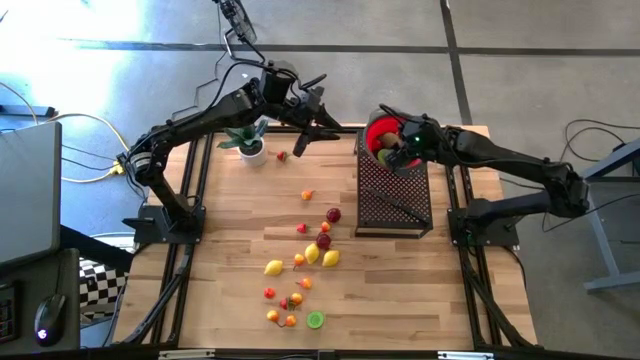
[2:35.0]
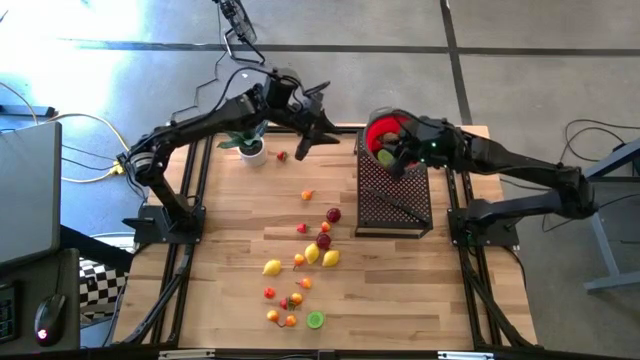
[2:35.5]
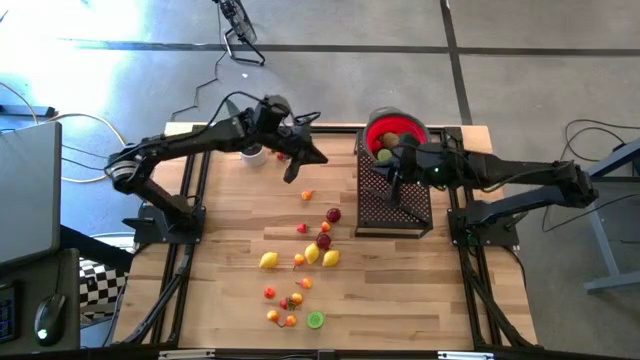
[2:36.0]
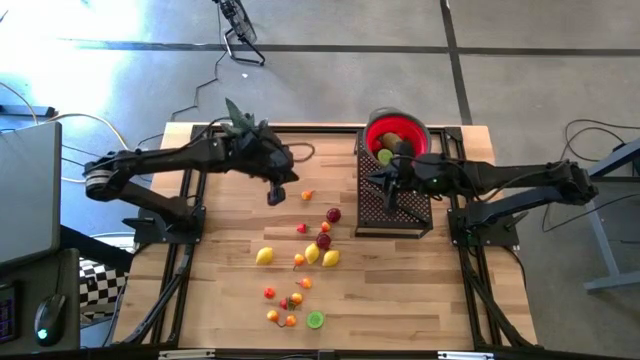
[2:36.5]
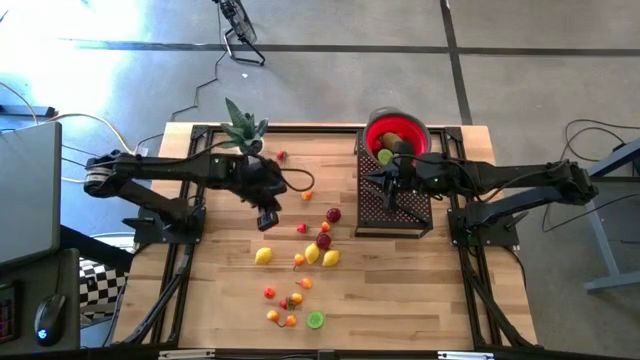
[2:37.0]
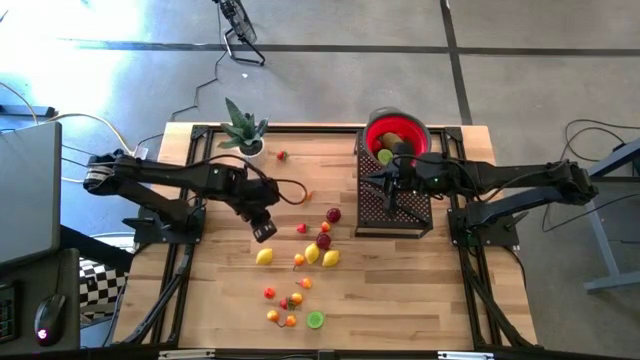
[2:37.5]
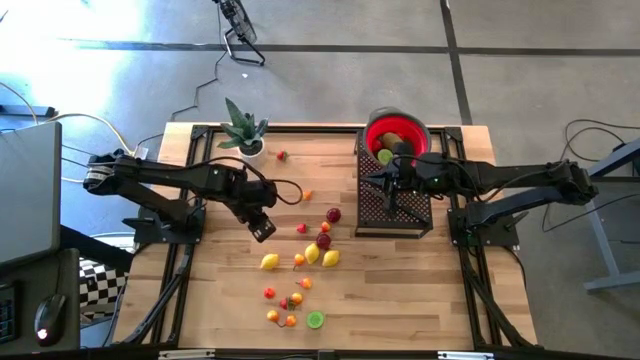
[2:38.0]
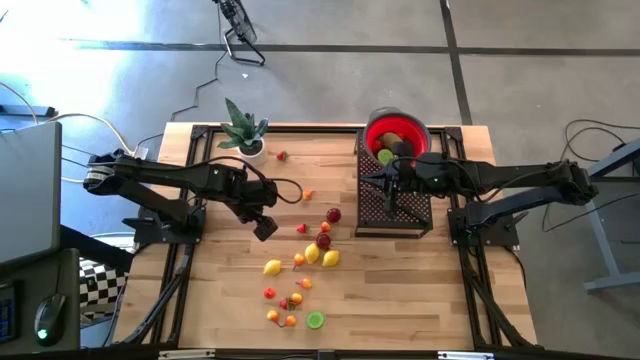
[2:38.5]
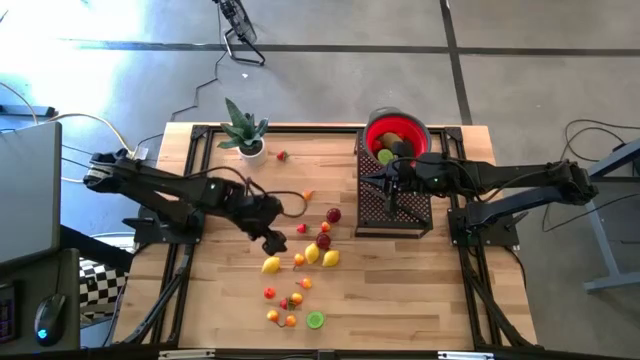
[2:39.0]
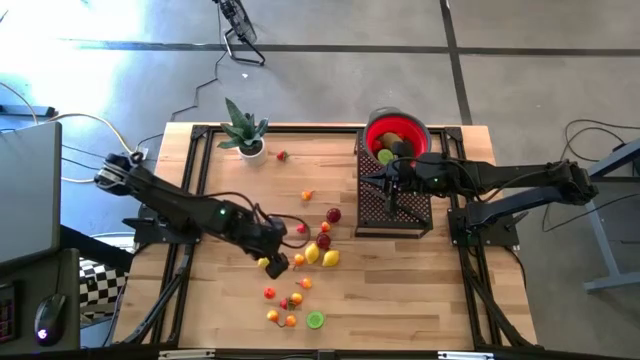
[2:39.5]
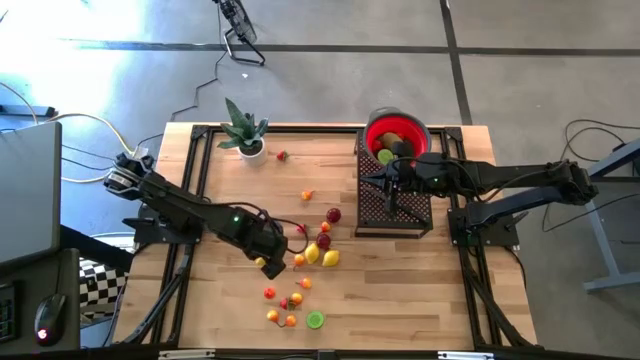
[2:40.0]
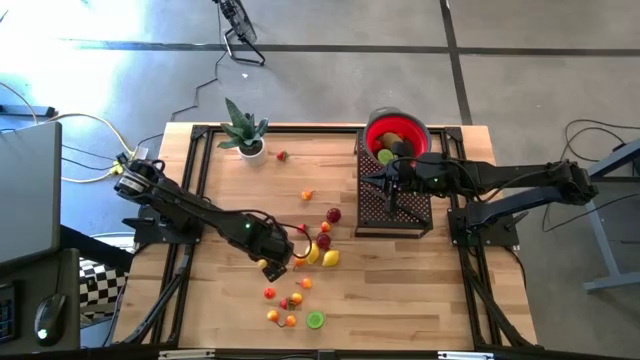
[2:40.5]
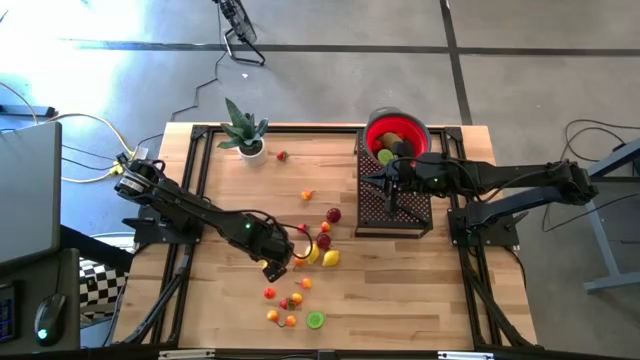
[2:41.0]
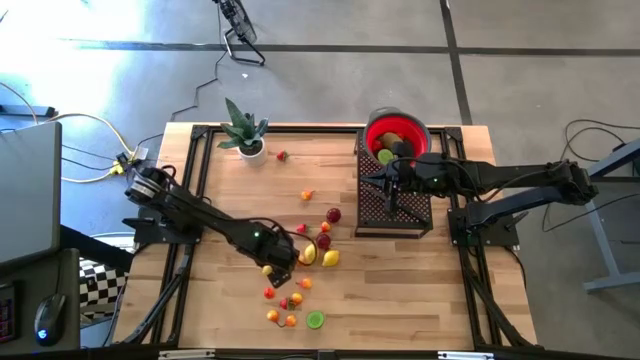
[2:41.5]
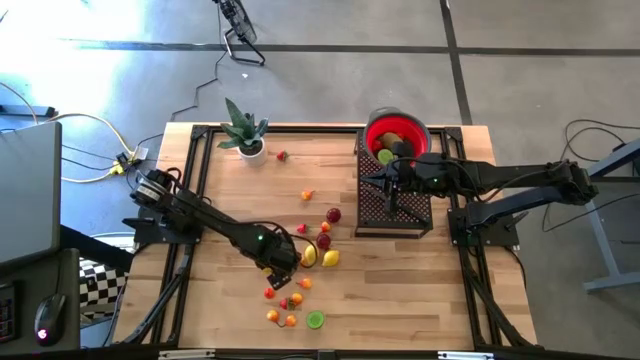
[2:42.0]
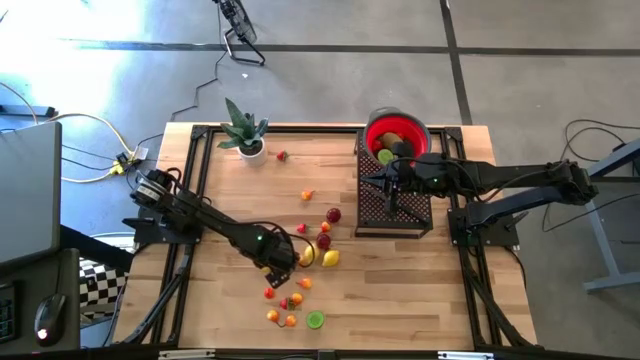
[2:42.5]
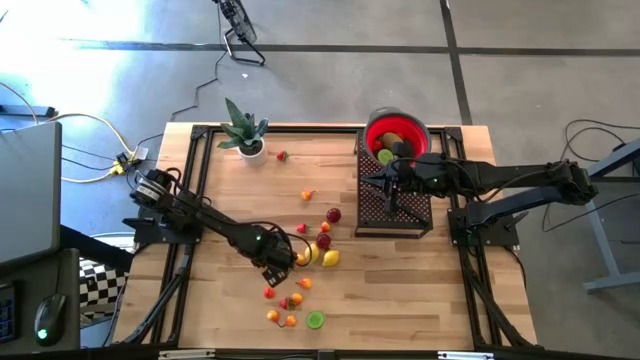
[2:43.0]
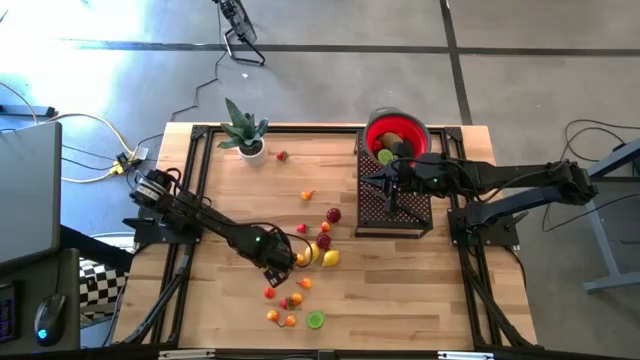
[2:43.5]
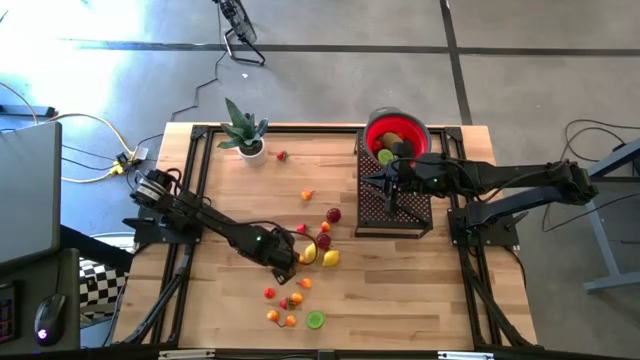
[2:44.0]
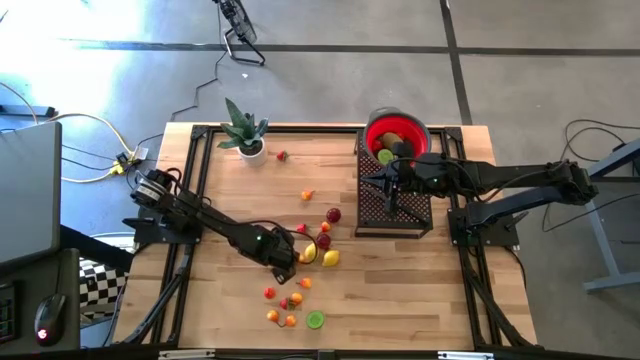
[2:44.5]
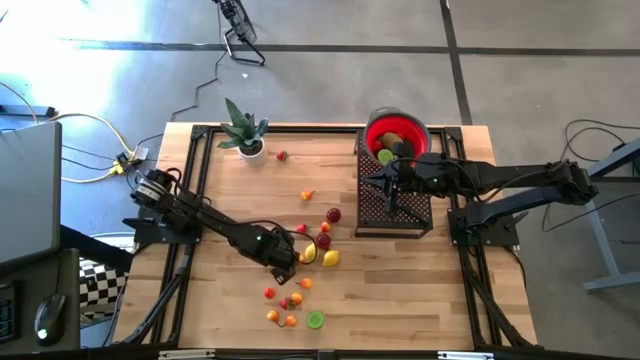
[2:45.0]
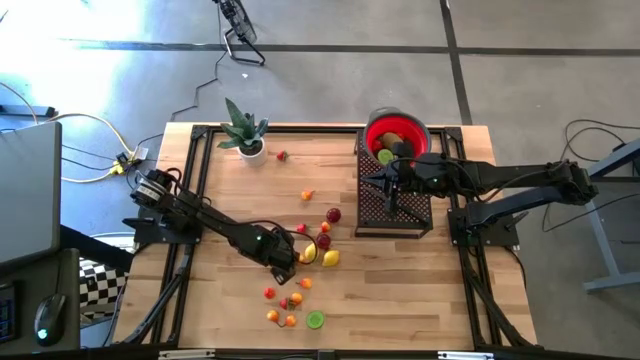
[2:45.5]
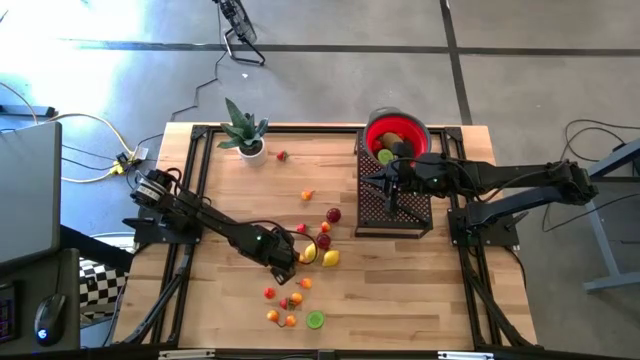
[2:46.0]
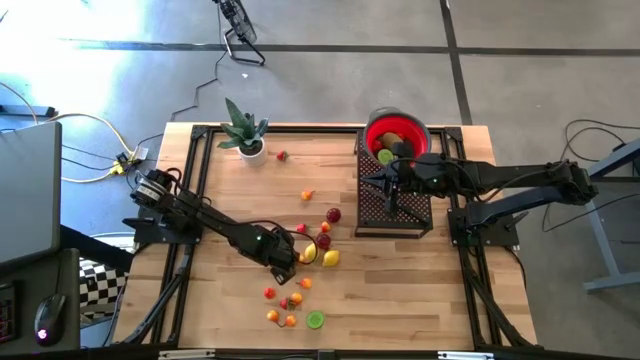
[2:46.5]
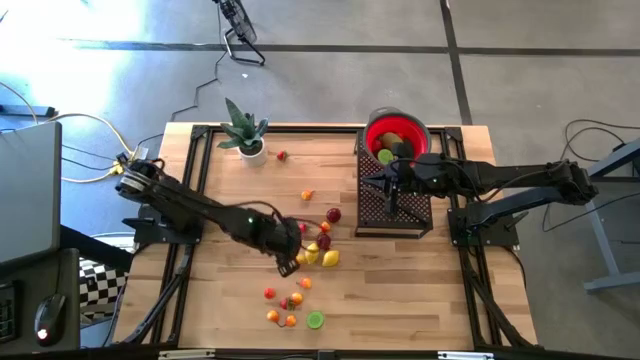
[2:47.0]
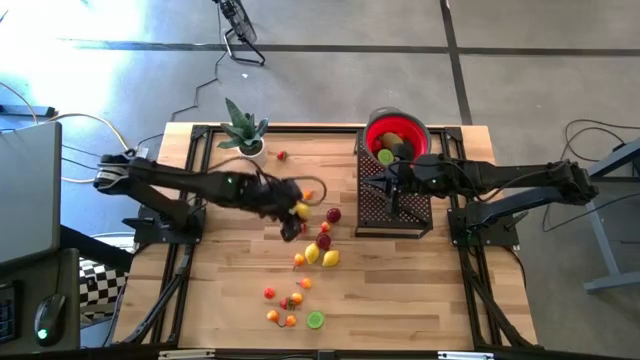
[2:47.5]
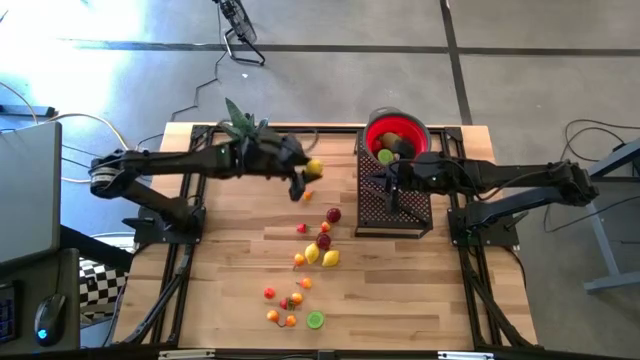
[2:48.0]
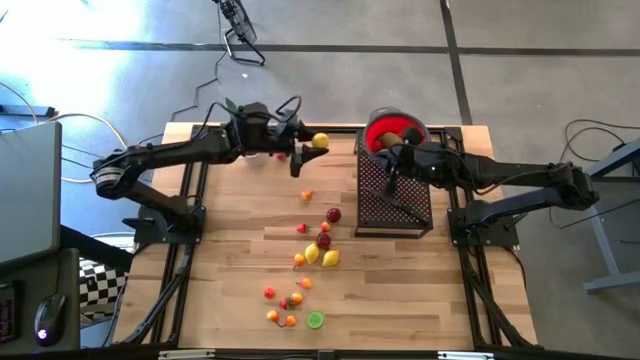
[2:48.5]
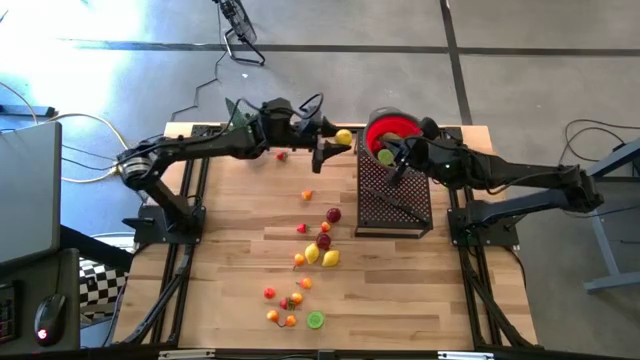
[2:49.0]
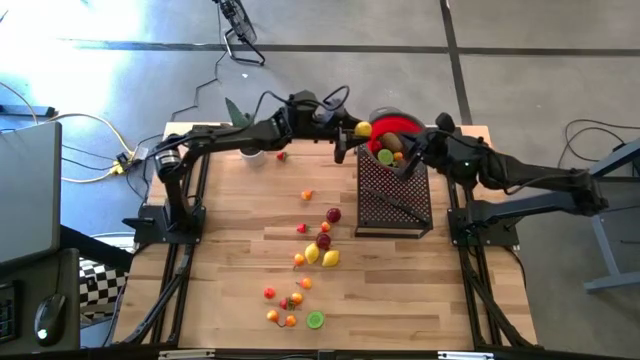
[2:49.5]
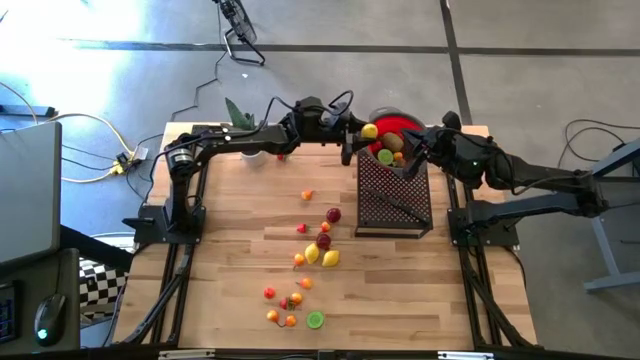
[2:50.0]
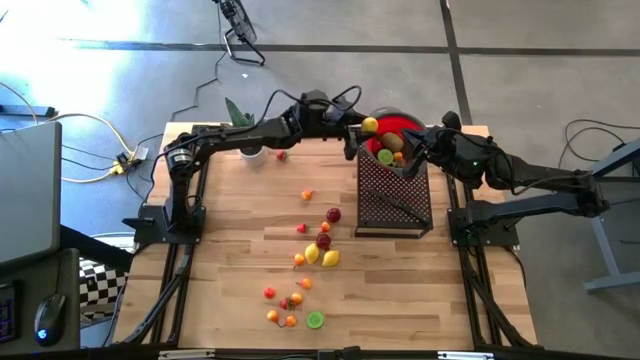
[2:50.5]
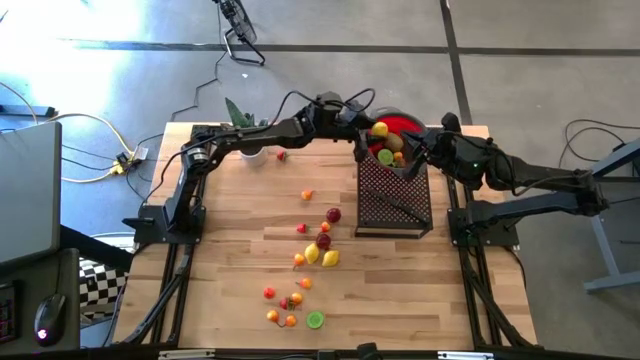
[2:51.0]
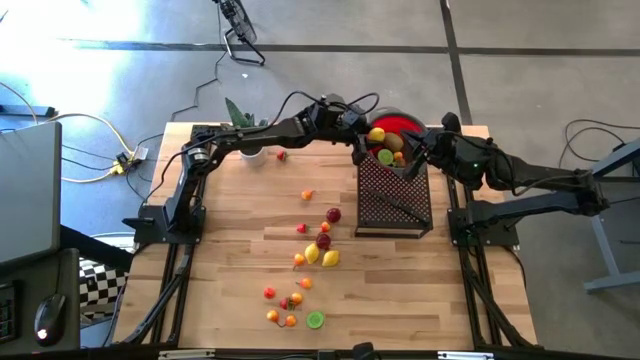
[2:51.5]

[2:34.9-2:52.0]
Task: Pick & Place Fruit
Put the lemon into the strainer bowl on the shelf

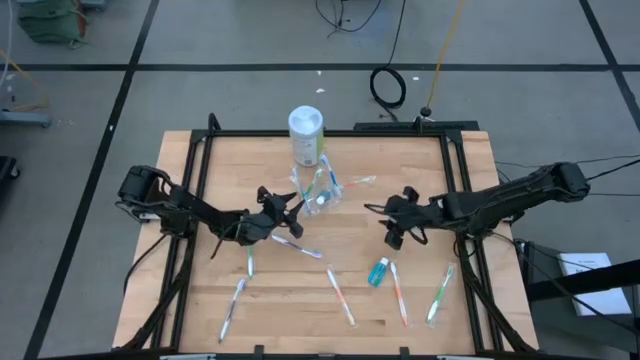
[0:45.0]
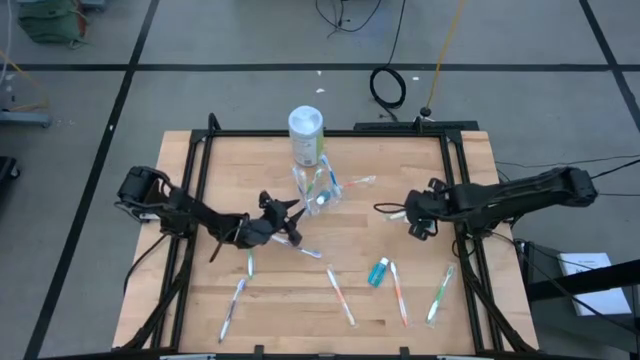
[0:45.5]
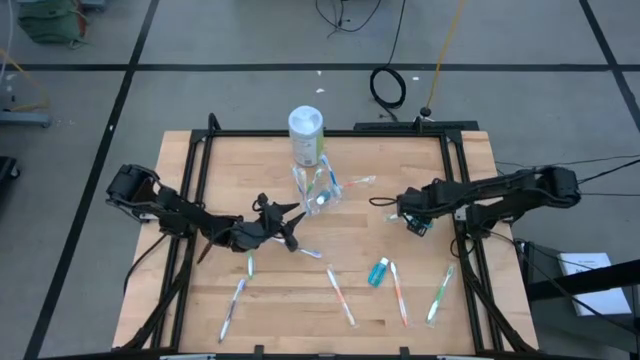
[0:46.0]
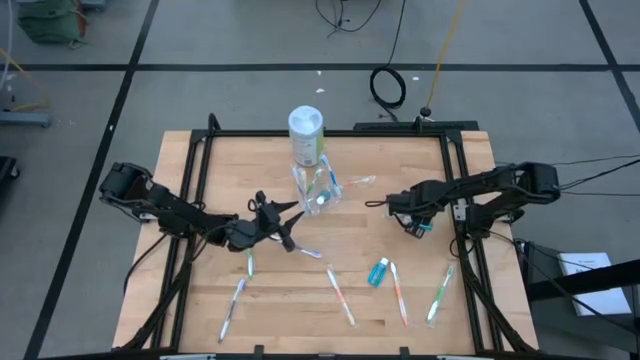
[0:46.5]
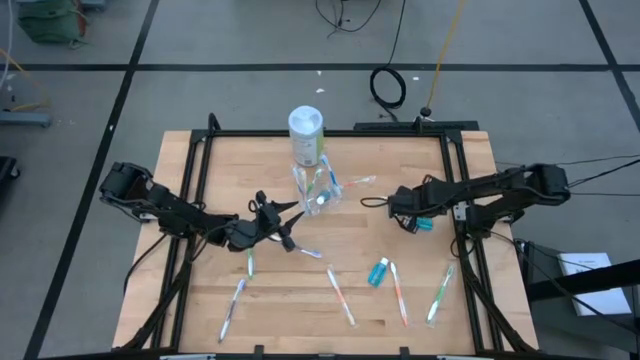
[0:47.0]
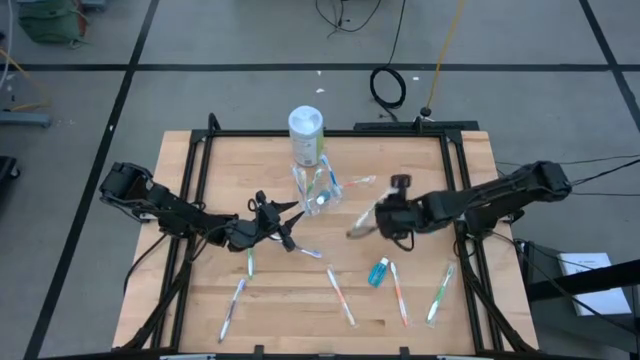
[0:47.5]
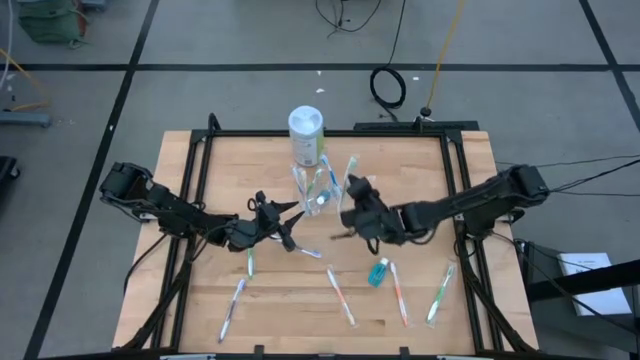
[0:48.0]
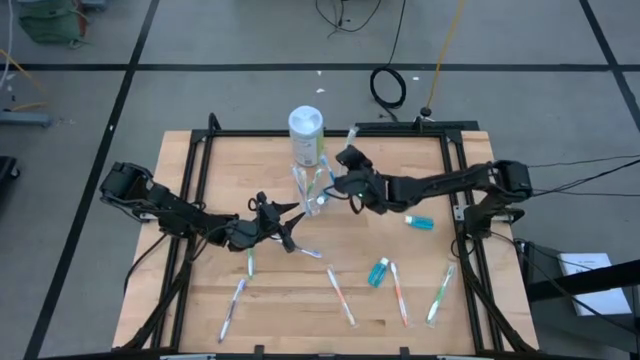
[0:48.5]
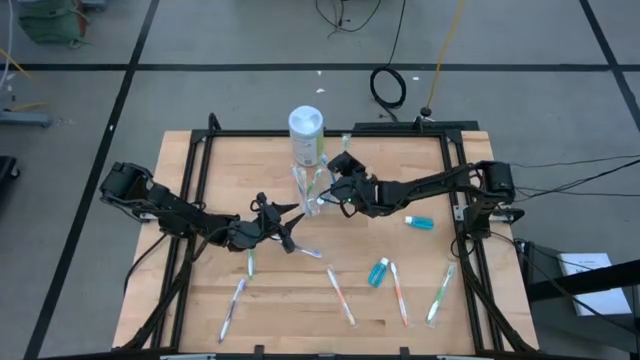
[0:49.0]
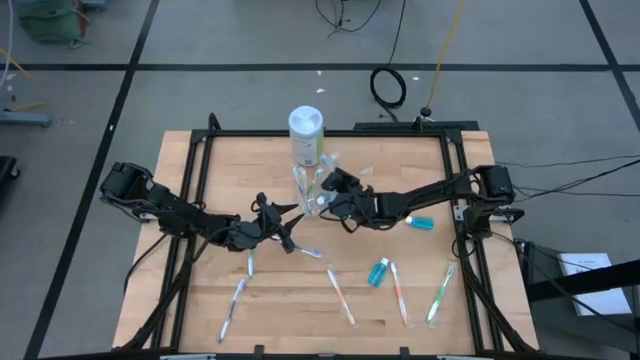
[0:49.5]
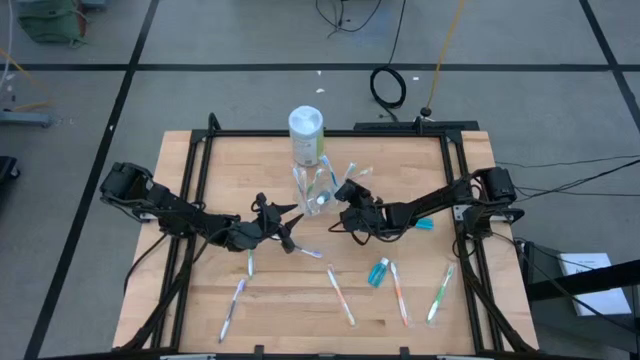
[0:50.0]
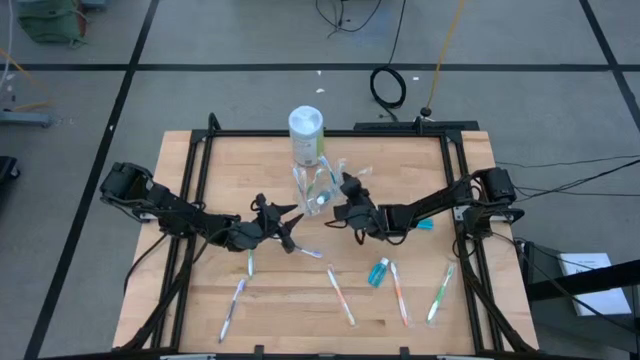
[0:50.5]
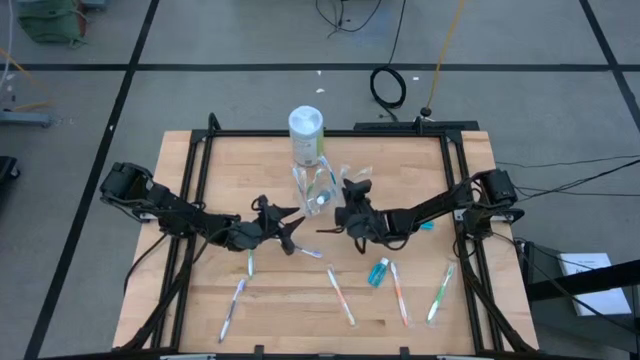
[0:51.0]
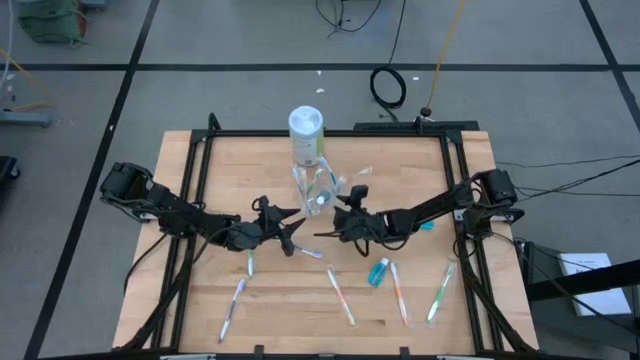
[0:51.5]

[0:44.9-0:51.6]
Task: Pick & Place toothbrushing station
Put the green toothbrush into the transparent organizer
